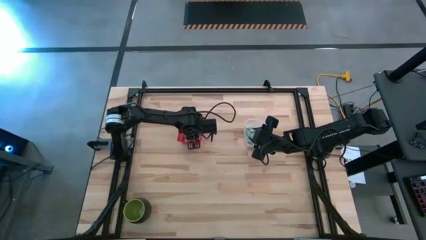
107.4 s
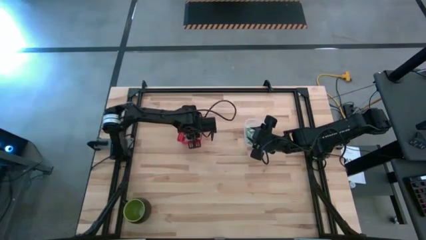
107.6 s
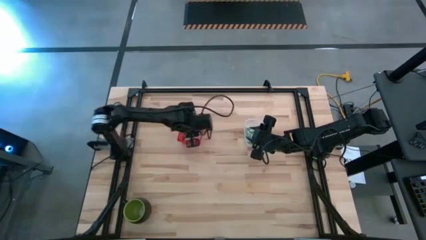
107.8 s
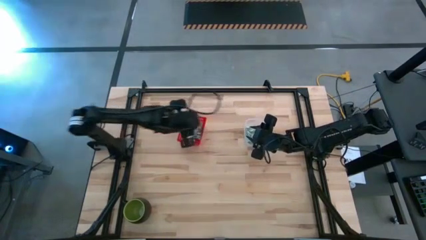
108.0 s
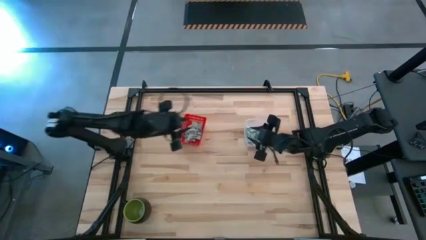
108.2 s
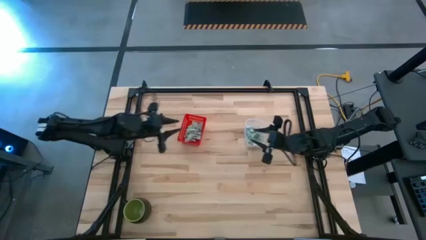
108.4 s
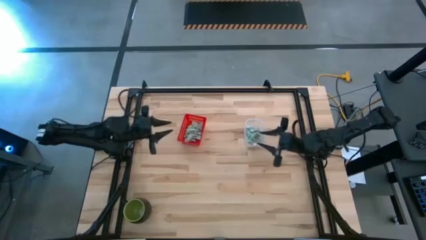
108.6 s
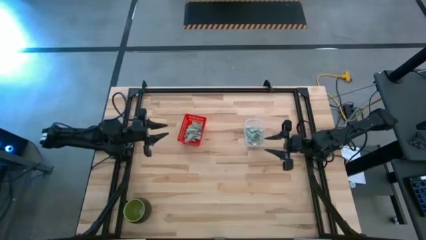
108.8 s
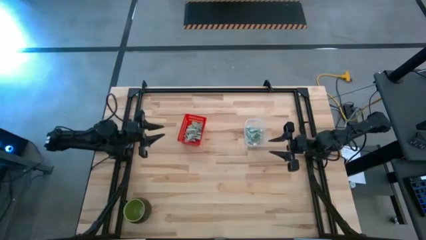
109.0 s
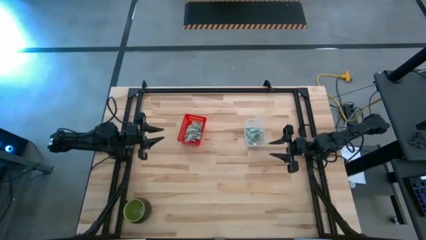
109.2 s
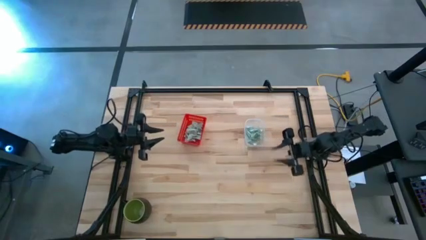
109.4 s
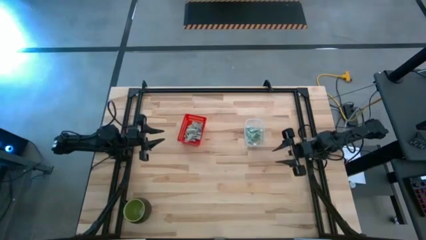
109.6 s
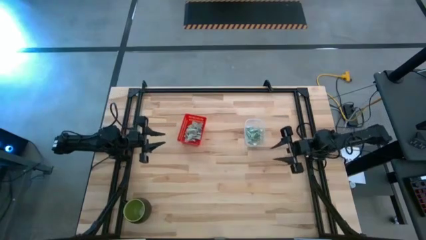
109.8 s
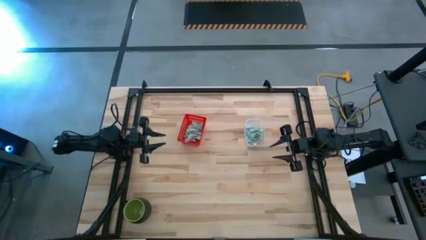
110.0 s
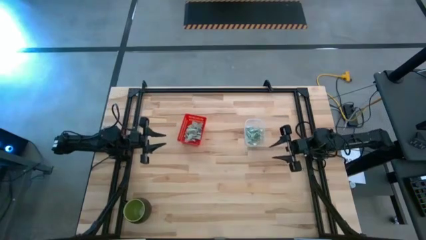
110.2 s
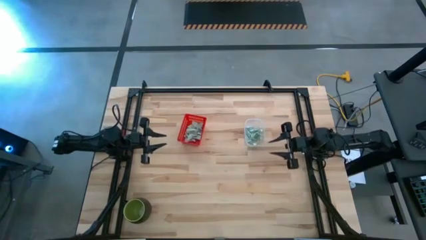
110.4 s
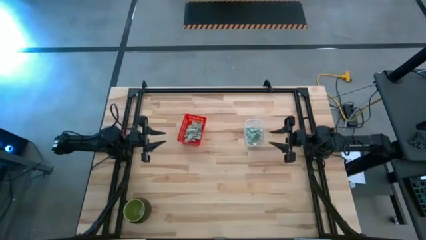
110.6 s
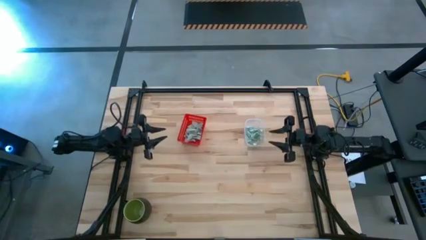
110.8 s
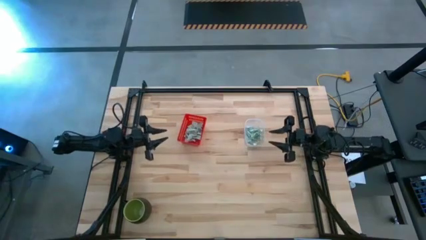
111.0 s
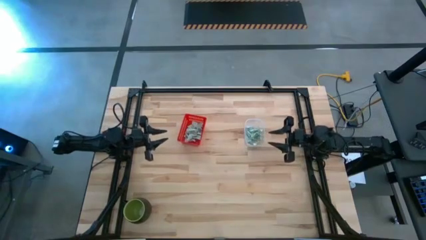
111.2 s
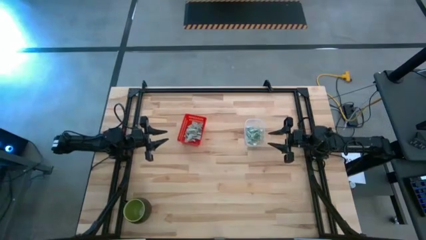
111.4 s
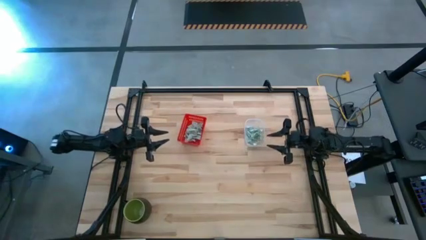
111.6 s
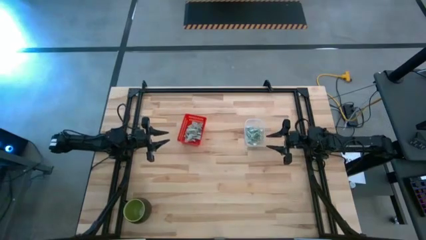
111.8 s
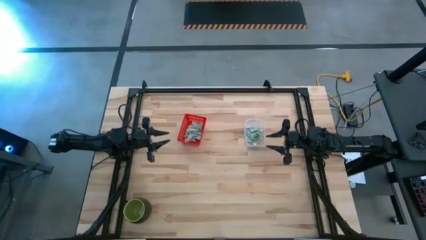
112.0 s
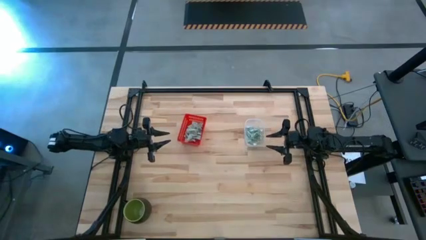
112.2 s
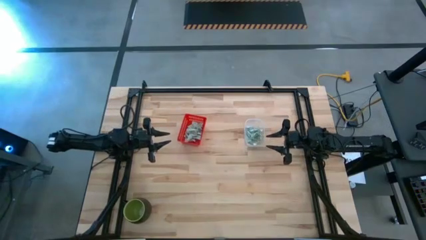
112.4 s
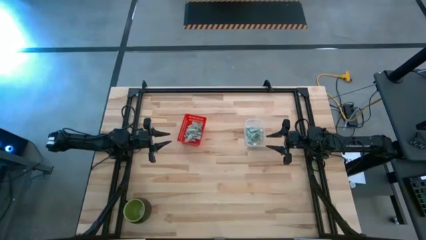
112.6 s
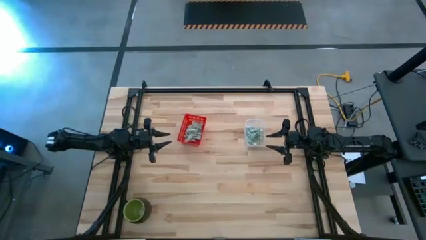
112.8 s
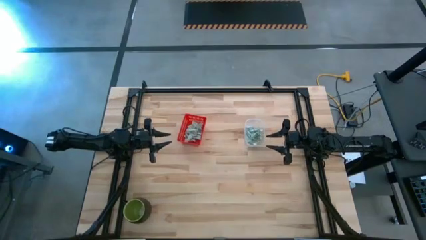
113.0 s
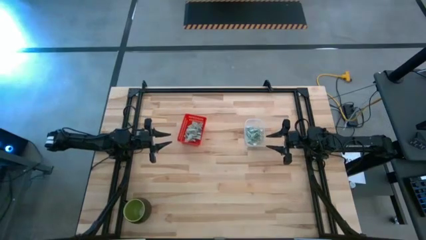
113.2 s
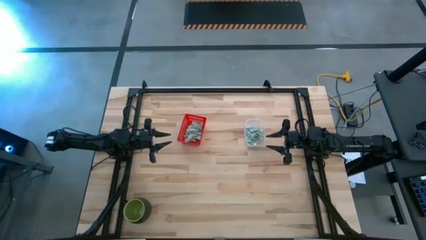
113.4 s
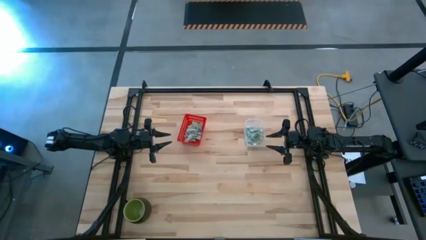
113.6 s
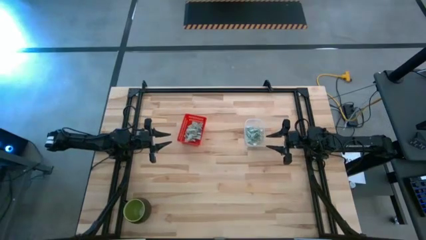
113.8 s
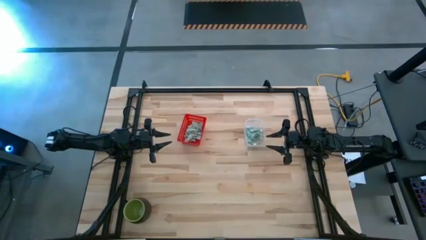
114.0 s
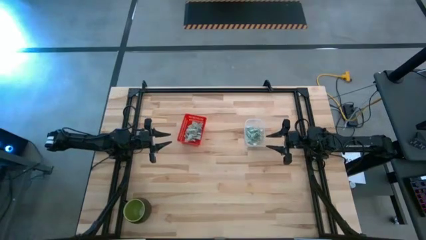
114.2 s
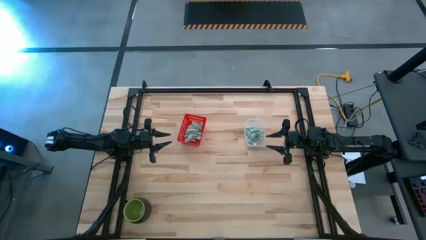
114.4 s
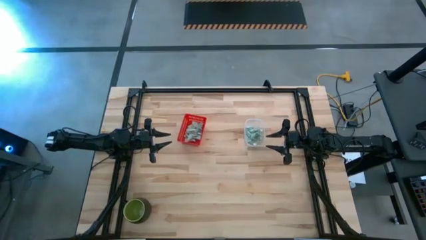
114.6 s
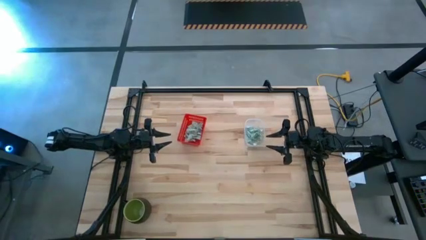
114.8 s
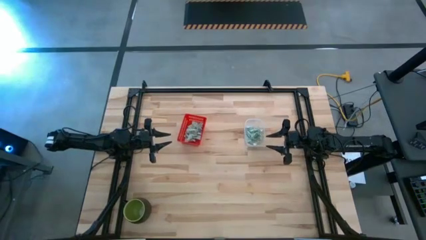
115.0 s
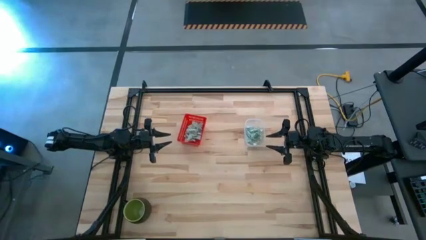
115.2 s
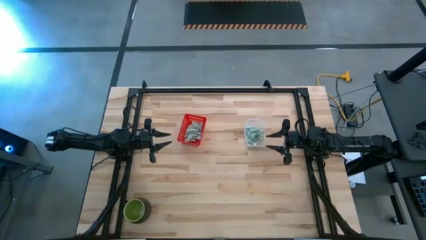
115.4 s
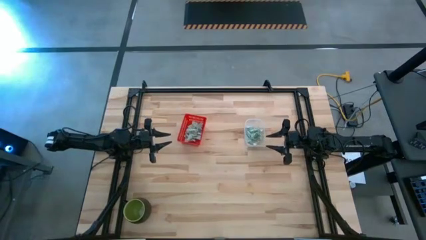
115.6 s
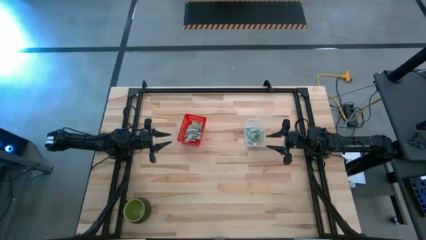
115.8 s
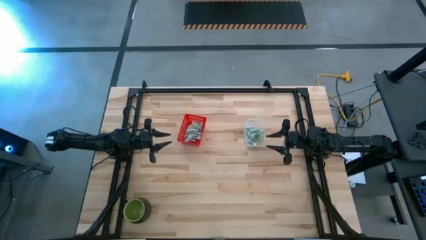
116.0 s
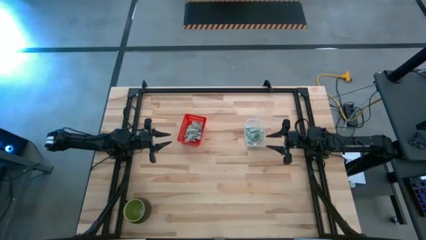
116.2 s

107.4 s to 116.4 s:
Task: Pick and place items into bin
Return to Home Position

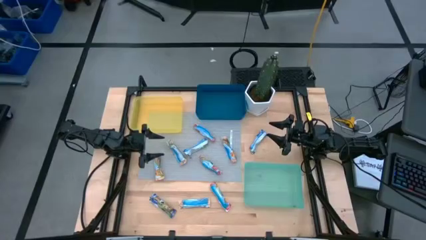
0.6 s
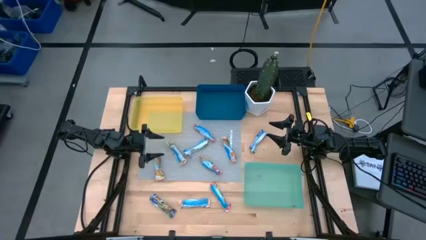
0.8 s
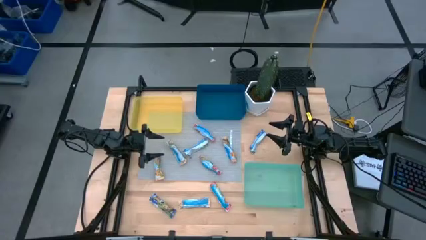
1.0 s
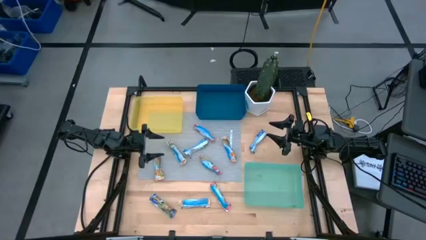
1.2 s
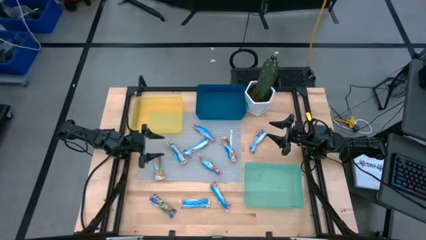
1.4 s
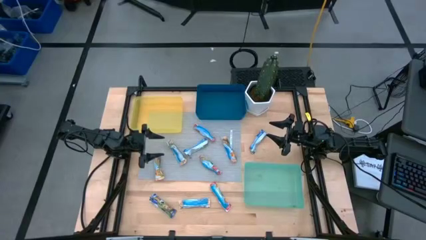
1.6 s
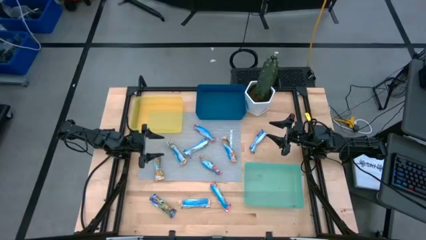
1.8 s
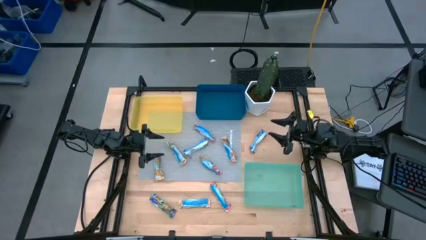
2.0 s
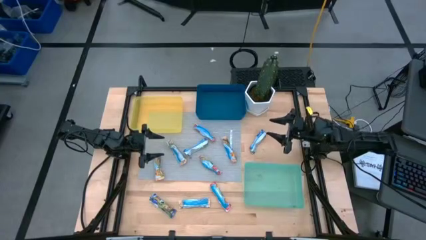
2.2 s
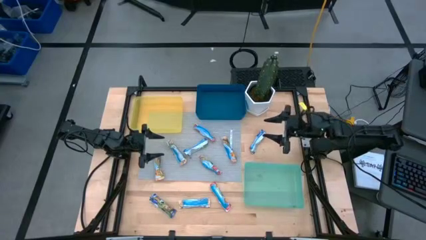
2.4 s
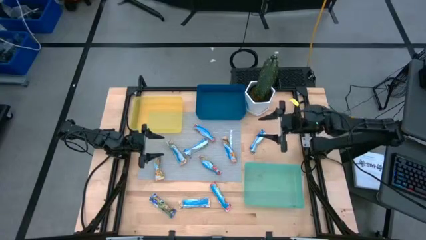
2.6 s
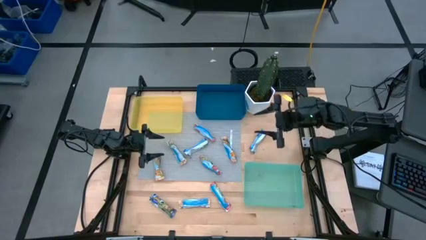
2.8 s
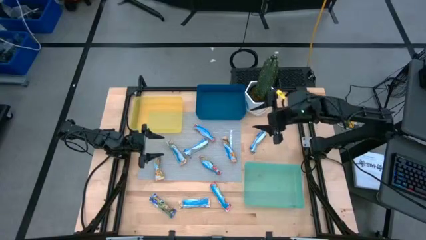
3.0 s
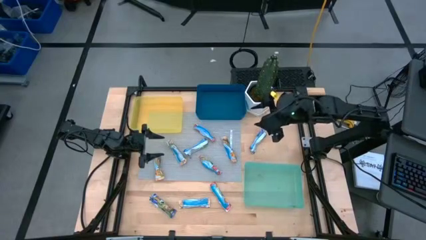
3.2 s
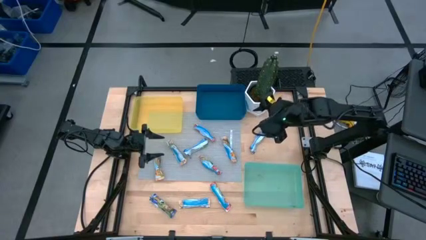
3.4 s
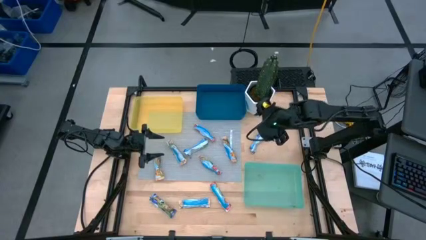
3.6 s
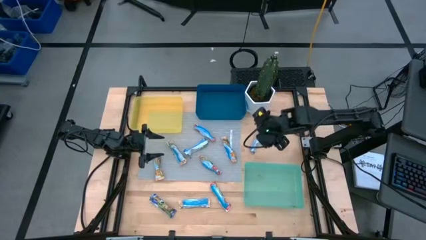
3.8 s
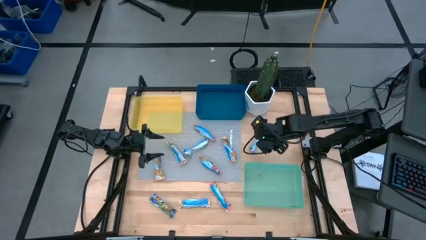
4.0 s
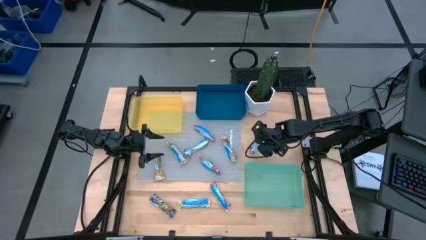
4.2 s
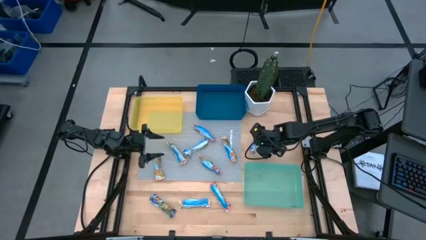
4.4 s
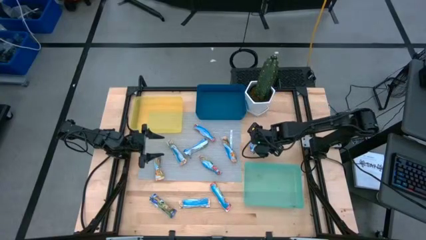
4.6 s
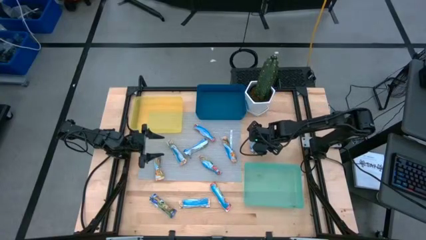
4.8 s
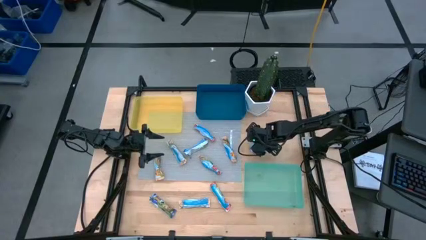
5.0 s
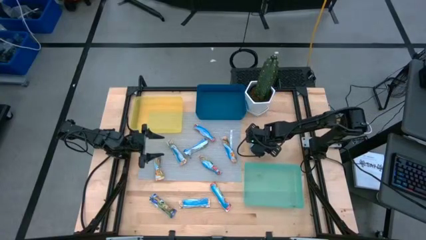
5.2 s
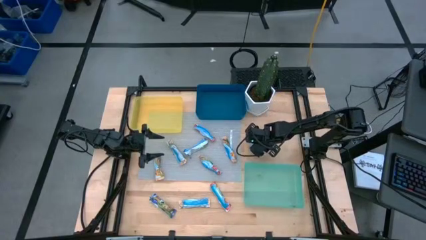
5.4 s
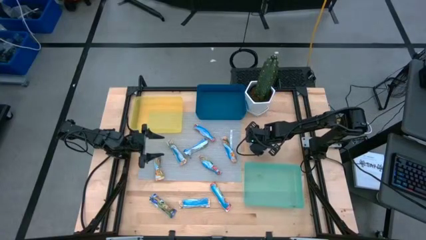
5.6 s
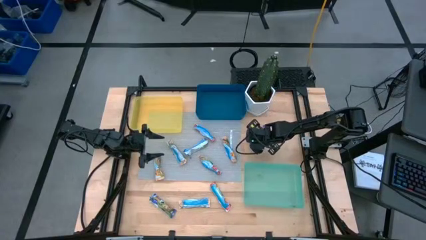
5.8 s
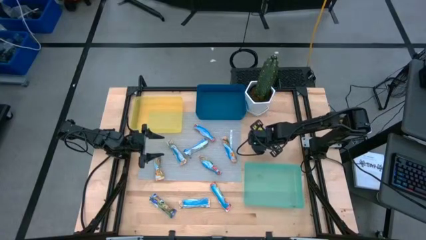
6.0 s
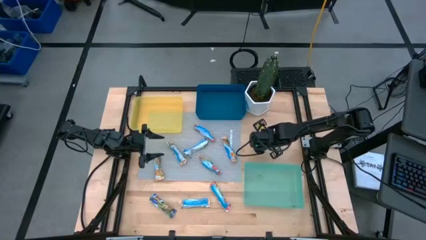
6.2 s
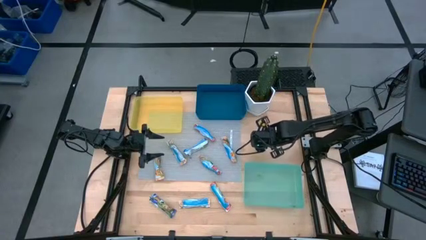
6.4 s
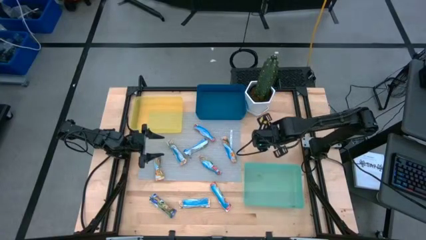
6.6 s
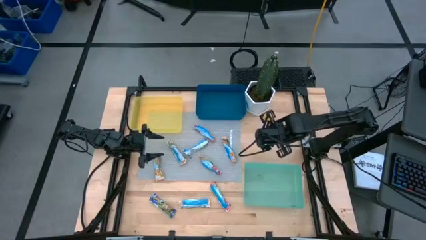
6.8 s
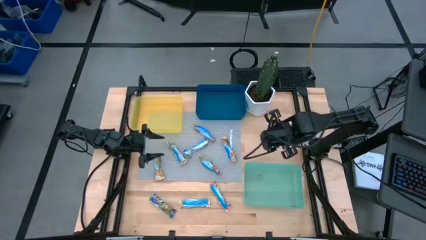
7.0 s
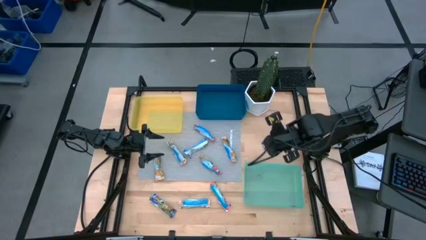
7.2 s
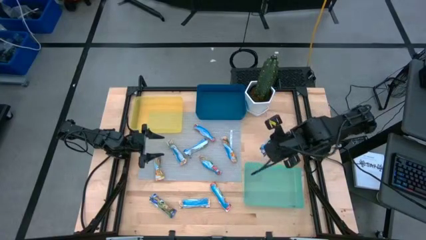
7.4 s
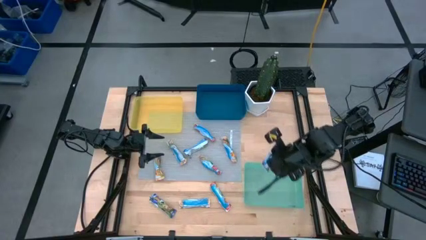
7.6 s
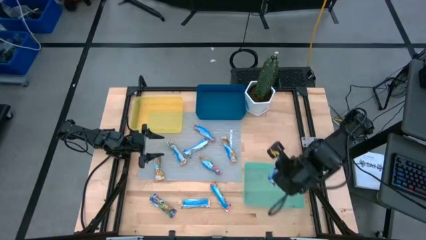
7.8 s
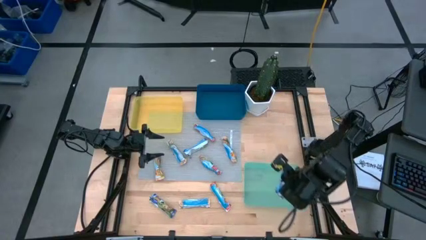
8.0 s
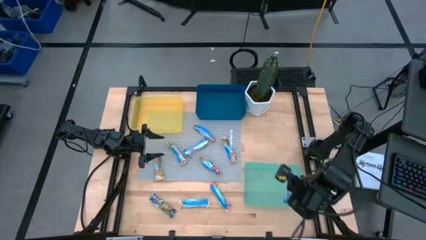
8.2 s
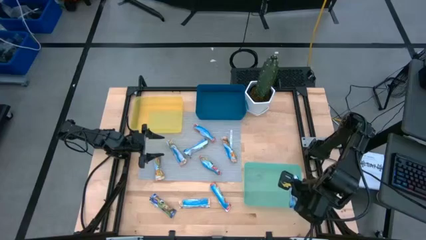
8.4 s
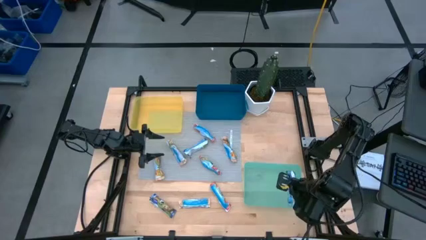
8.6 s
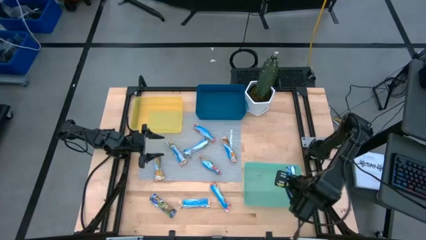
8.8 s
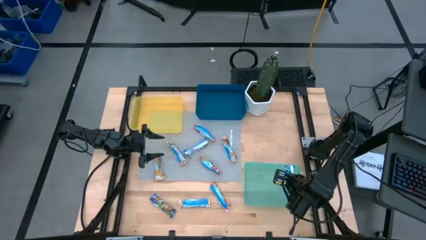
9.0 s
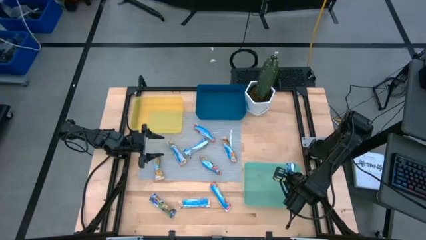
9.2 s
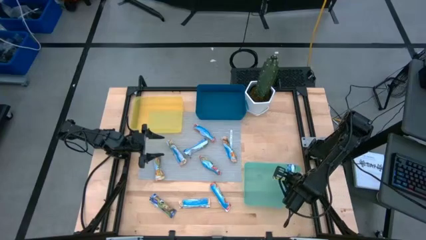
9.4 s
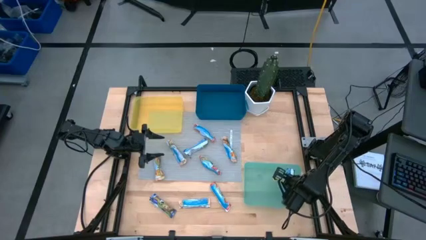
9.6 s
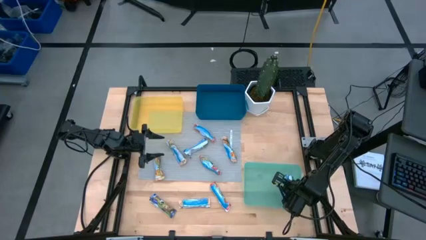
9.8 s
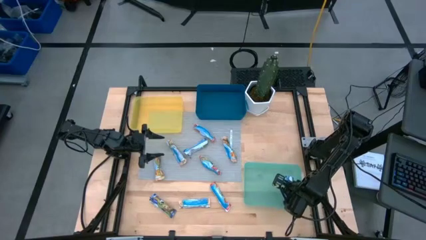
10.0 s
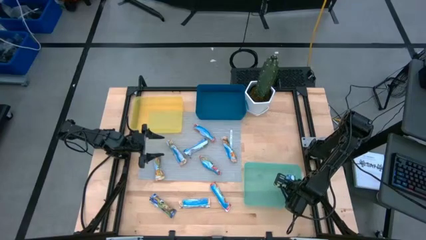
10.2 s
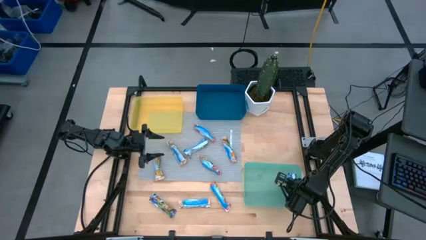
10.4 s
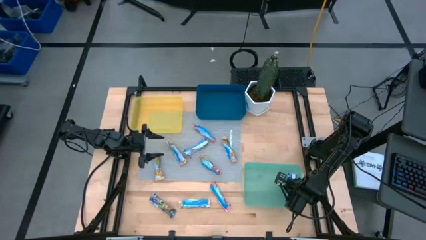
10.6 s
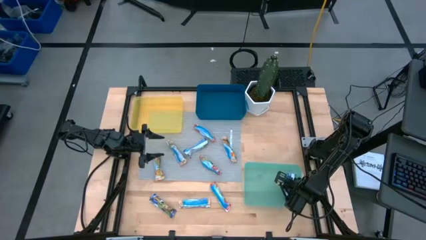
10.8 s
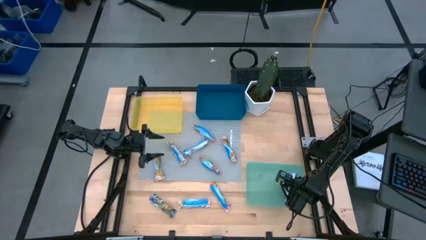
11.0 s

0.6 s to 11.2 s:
Task: Pick and place Granola Bars by type
Put the blue granola bar into the green bin
